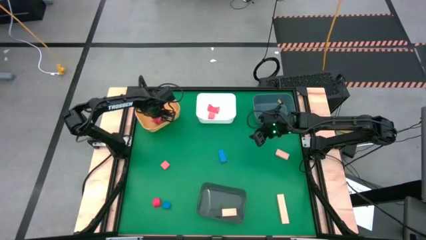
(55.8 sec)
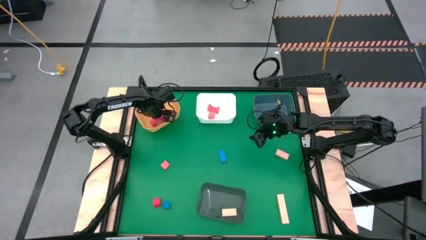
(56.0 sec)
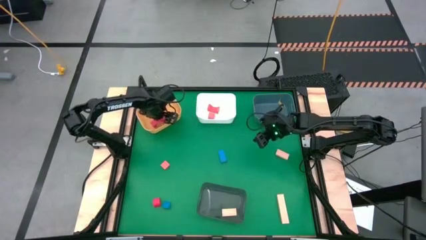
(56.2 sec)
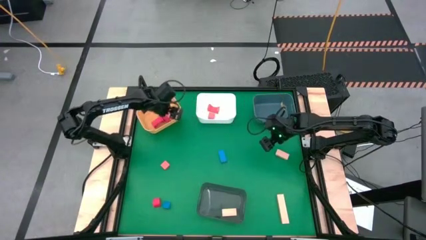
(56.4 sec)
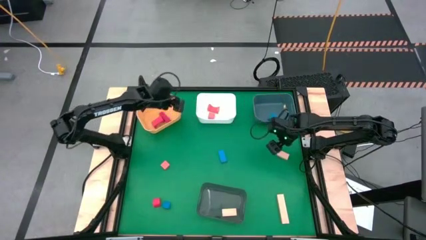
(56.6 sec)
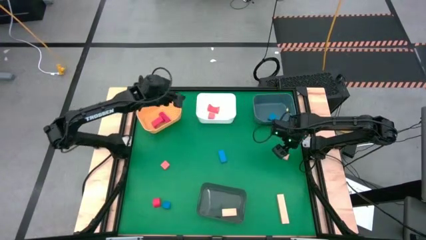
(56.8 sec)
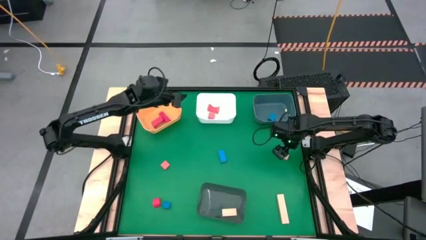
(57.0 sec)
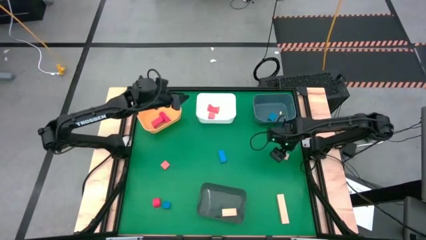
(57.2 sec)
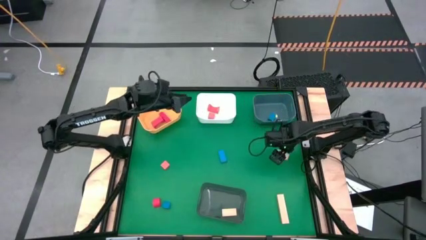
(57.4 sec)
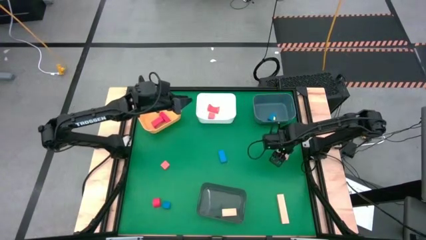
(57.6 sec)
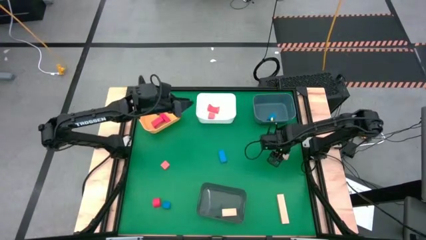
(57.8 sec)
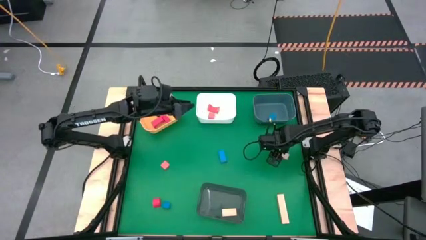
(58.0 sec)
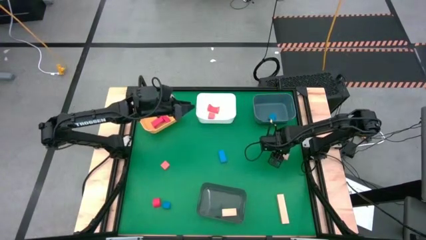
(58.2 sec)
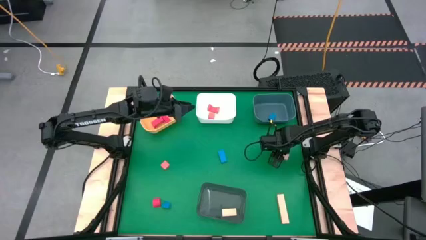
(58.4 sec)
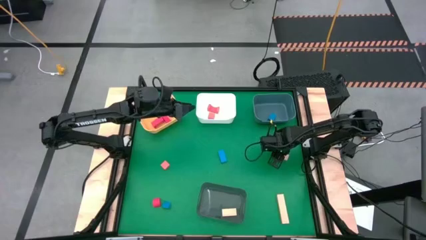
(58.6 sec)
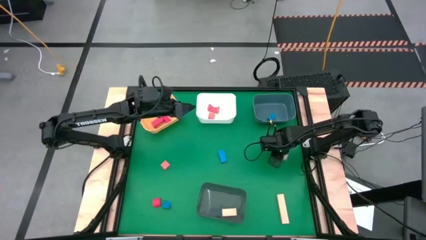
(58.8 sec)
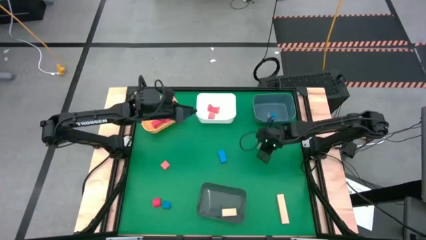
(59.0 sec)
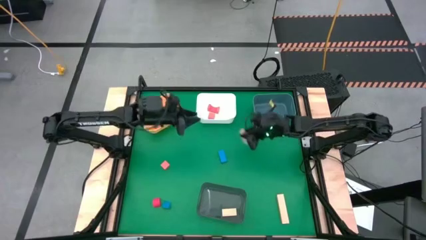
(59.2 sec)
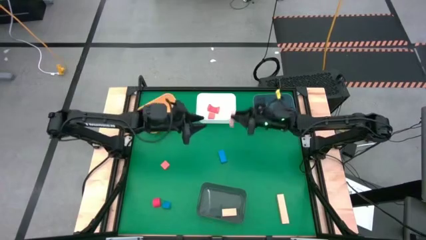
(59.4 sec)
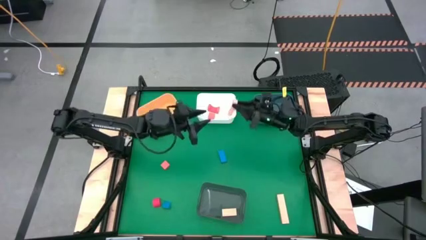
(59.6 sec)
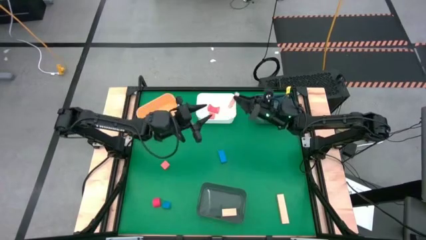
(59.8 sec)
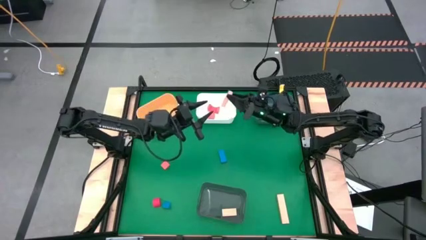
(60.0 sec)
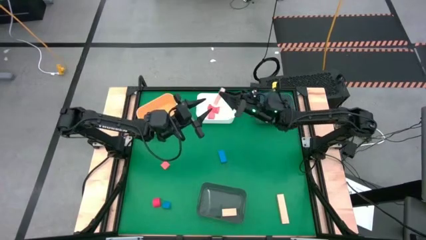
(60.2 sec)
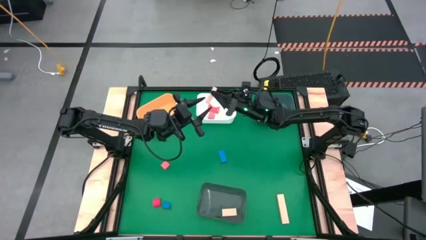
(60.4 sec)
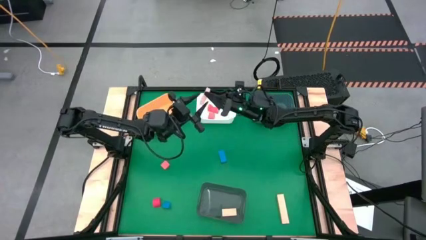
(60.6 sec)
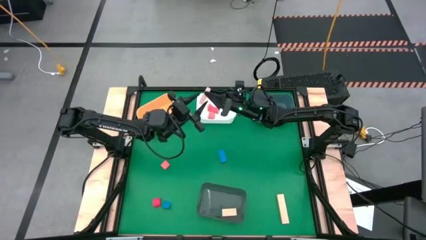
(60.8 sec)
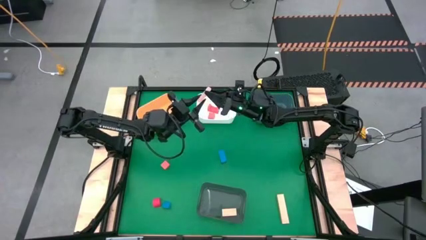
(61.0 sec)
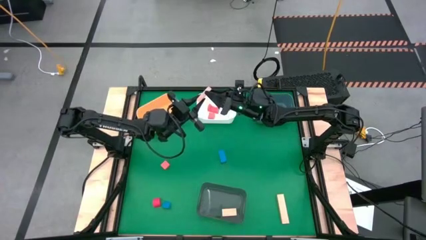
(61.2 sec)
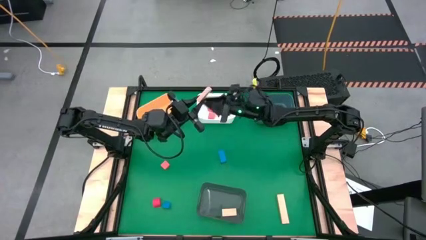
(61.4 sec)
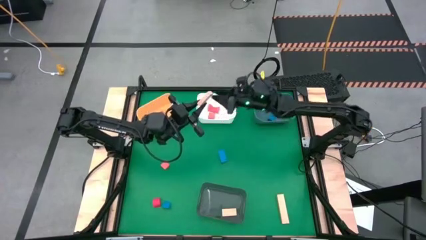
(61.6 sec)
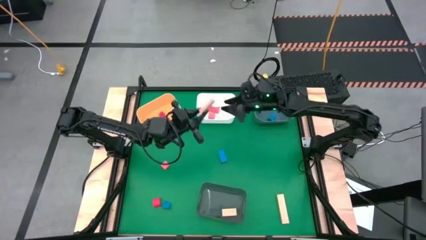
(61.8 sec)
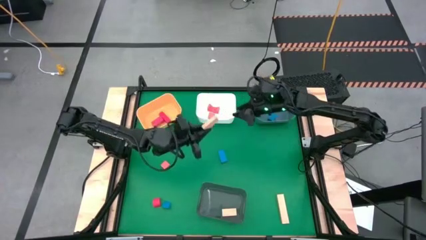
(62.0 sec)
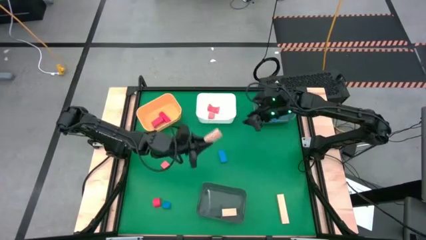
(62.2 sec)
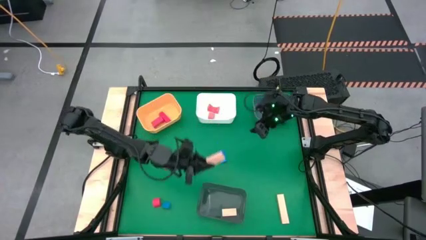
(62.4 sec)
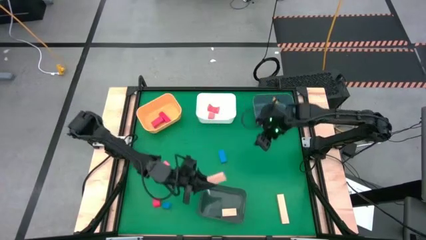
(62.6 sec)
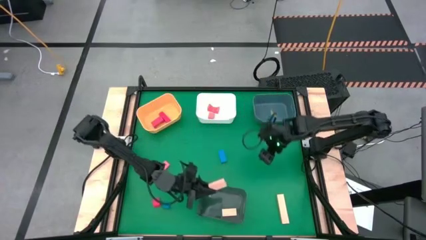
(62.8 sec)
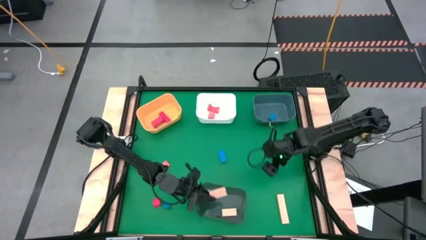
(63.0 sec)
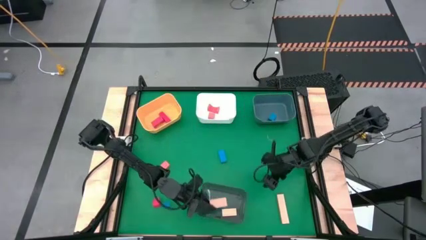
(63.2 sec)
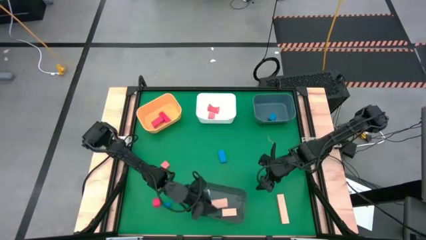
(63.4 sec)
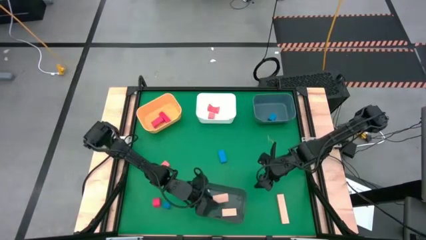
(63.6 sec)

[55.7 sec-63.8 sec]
Task: Sort & place blocks by color
Put the light orange block into the black bin

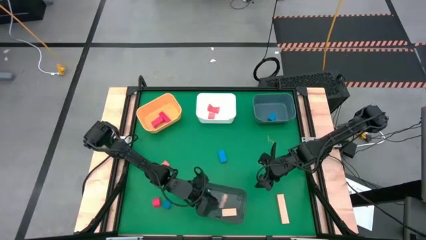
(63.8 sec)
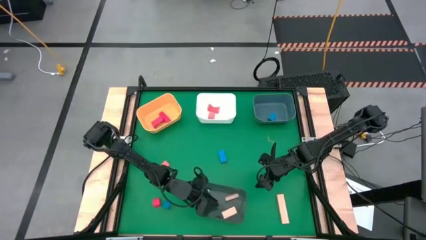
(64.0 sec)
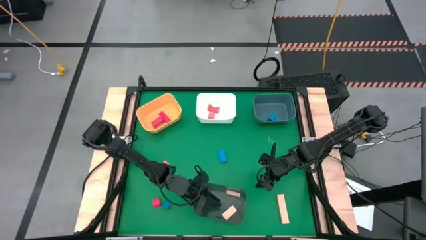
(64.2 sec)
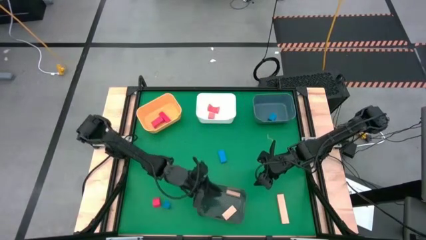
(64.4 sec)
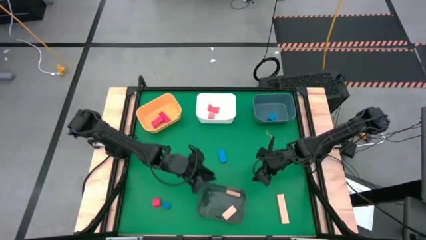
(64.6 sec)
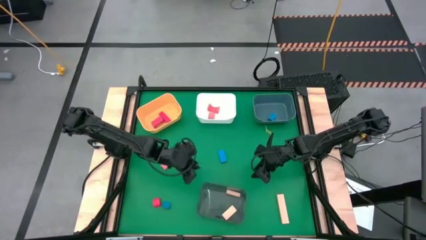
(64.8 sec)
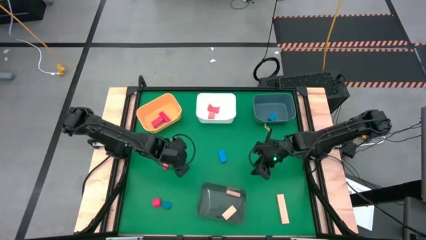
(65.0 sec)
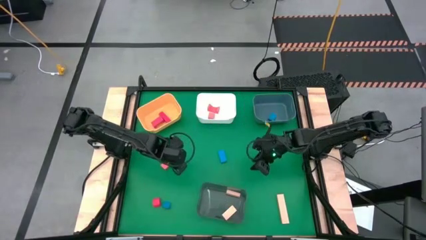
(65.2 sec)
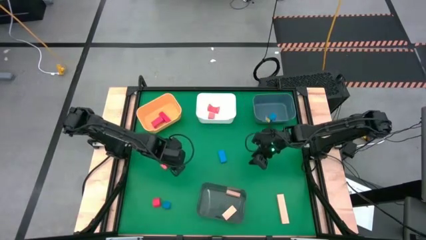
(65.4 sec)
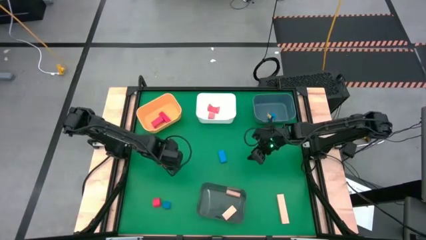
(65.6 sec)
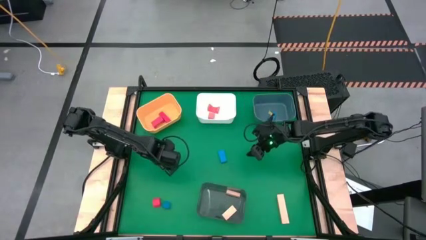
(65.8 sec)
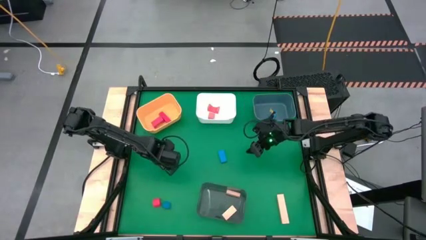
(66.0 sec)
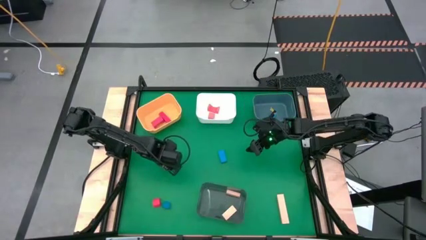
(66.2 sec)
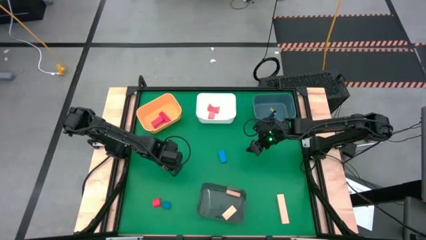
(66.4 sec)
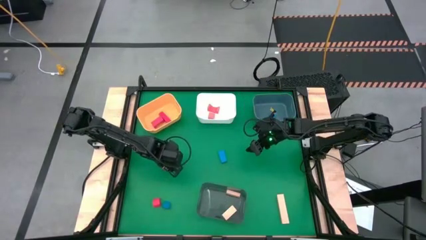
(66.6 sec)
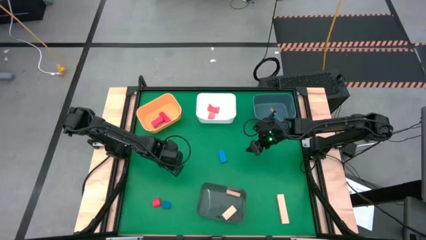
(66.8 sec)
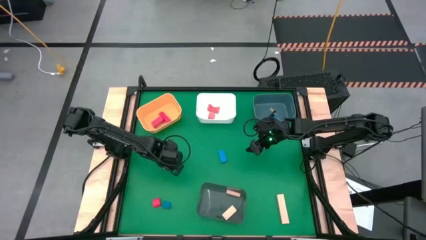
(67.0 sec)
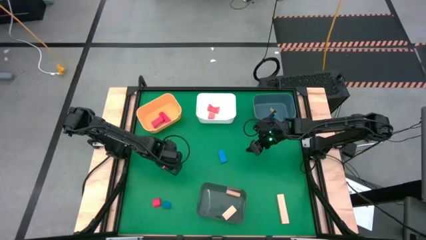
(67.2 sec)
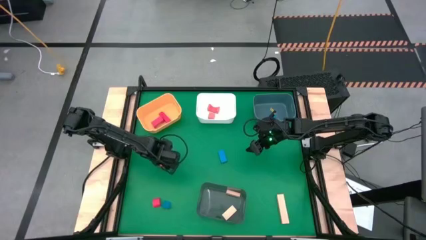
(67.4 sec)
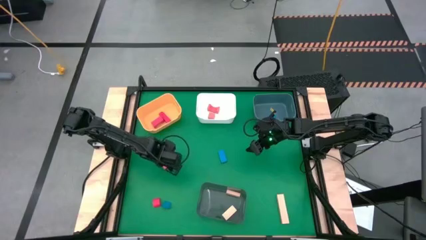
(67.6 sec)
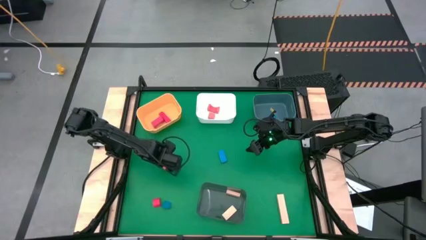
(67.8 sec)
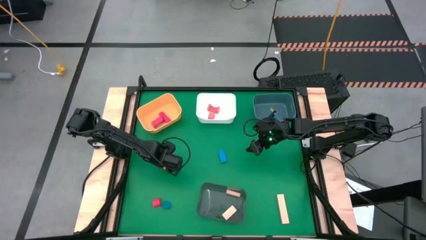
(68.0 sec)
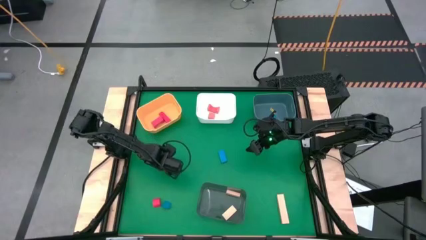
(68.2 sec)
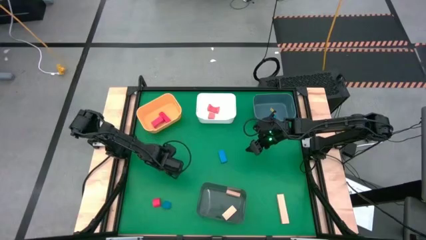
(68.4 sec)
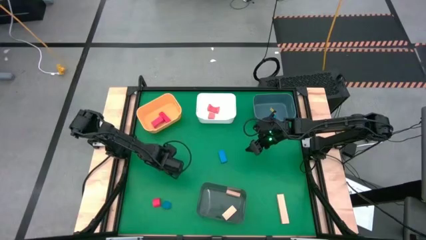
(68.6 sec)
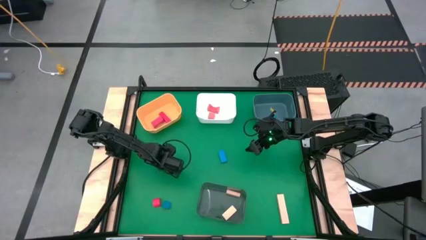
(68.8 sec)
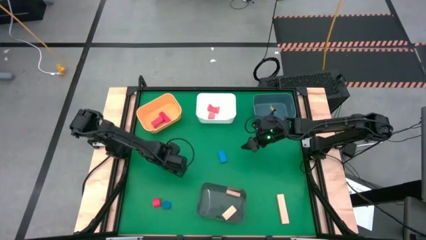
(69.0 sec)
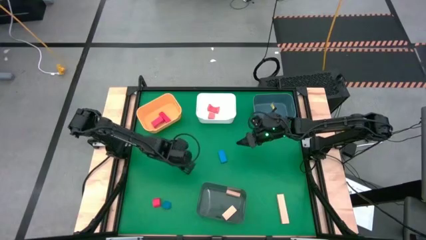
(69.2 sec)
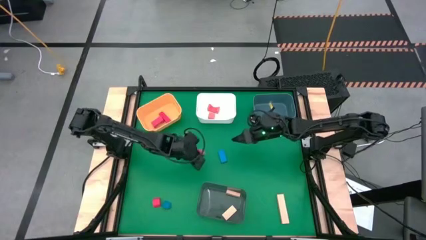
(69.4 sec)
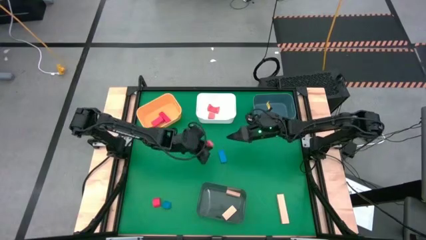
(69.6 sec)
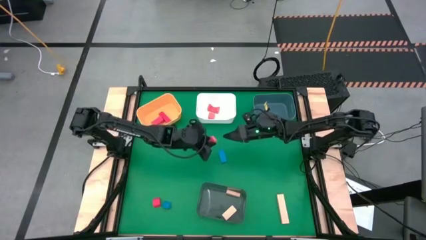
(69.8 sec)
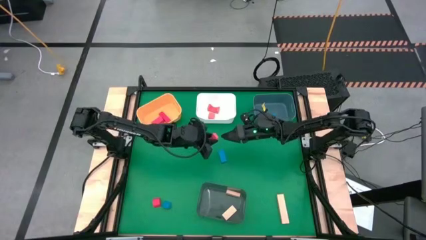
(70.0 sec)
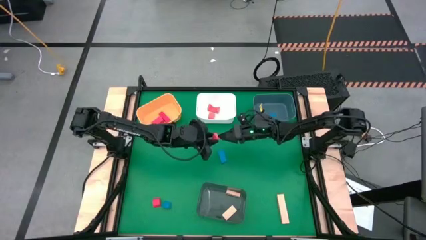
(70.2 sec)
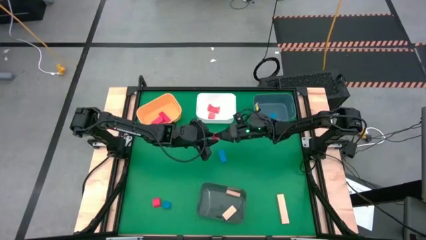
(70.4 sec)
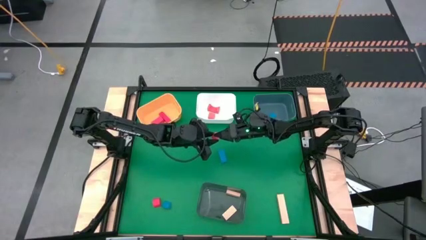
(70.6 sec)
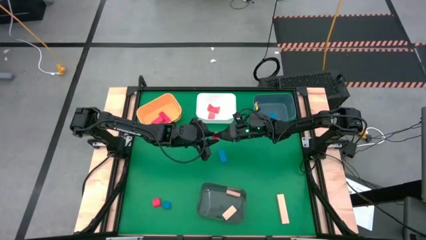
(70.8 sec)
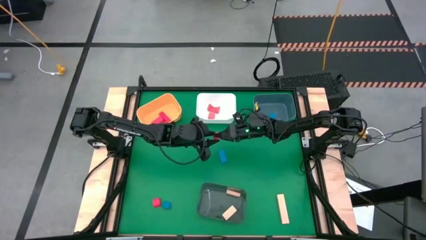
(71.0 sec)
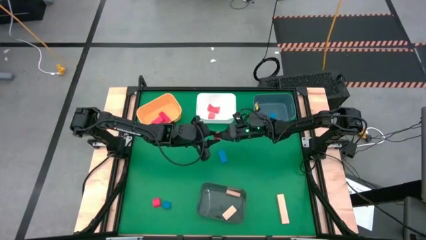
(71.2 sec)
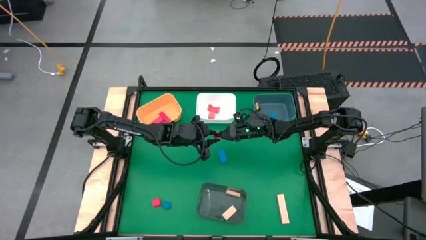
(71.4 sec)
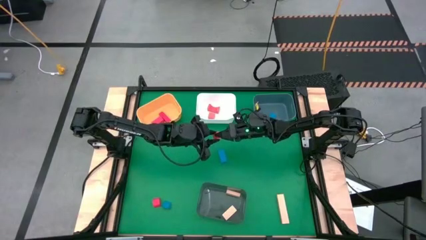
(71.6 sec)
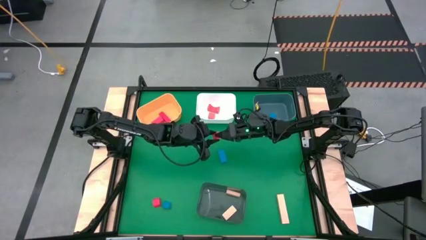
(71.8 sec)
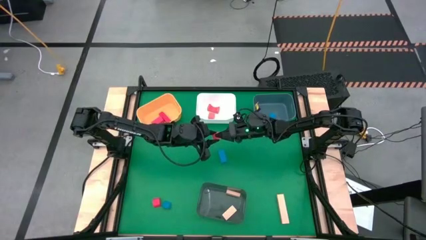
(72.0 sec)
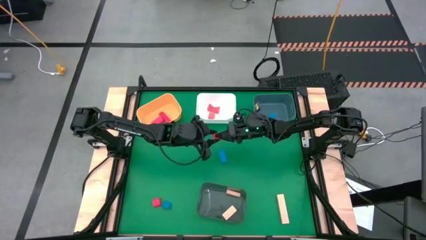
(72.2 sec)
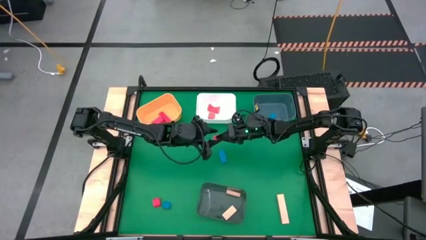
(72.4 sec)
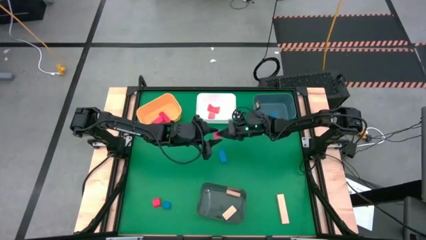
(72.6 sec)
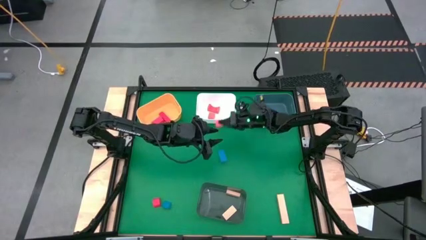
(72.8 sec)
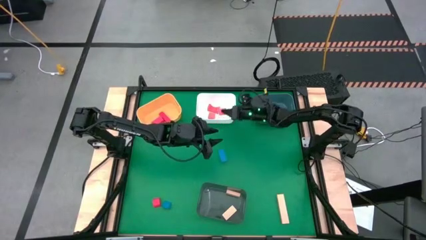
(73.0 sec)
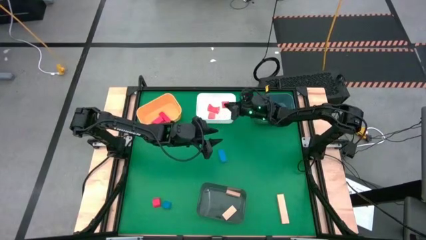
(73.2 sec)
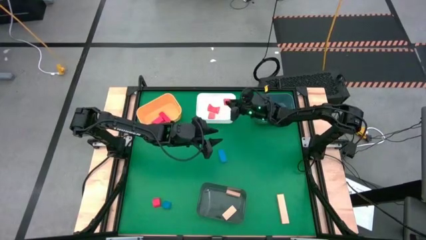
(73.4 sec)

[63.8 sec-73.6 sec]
Put the orange block into the white bin
